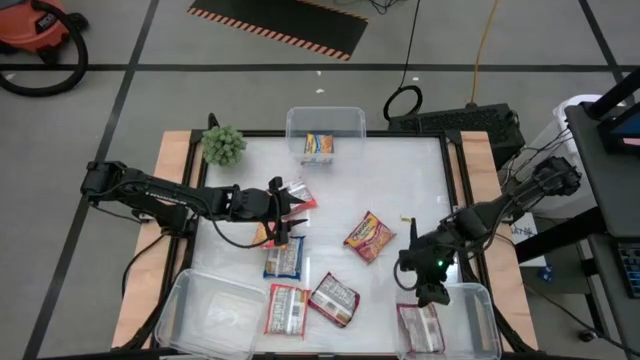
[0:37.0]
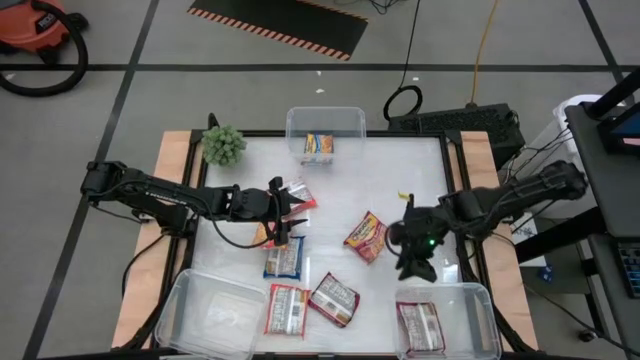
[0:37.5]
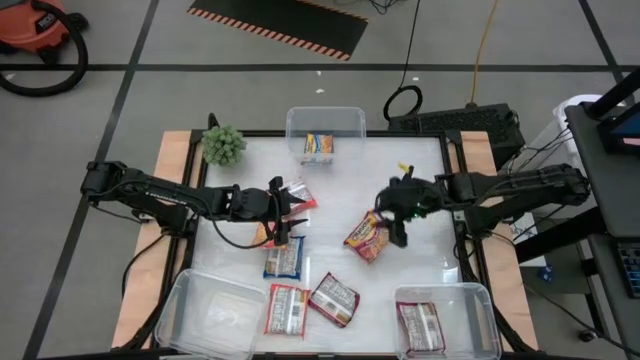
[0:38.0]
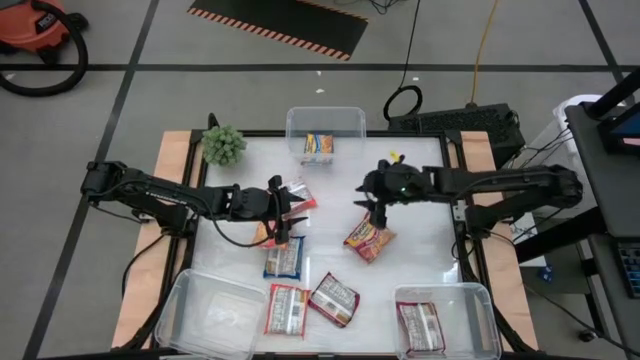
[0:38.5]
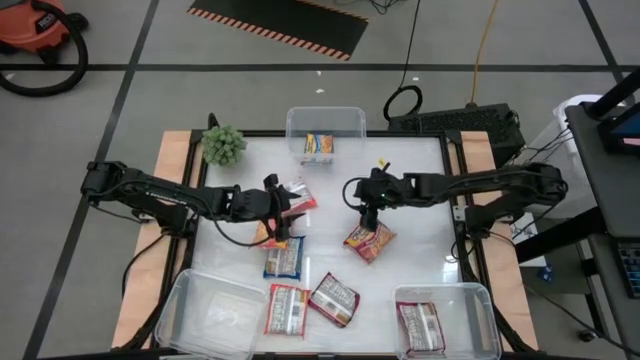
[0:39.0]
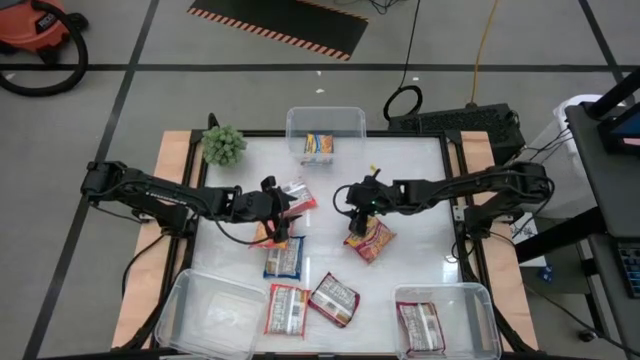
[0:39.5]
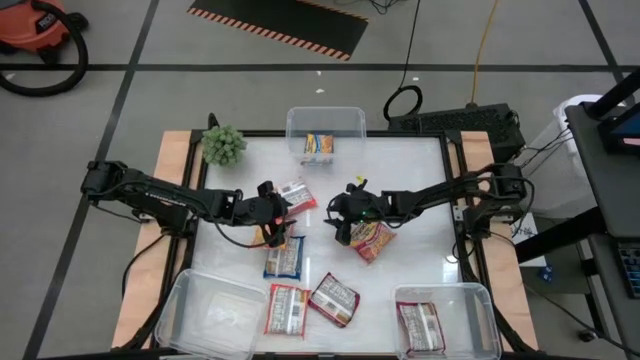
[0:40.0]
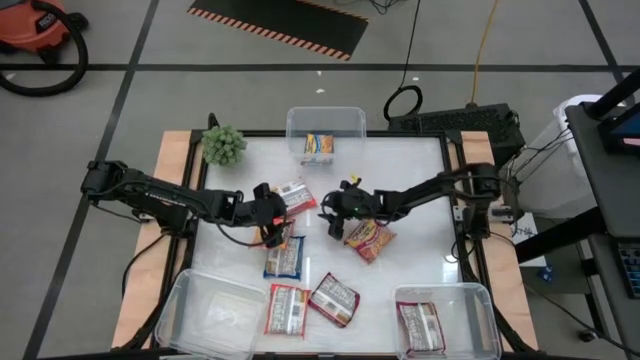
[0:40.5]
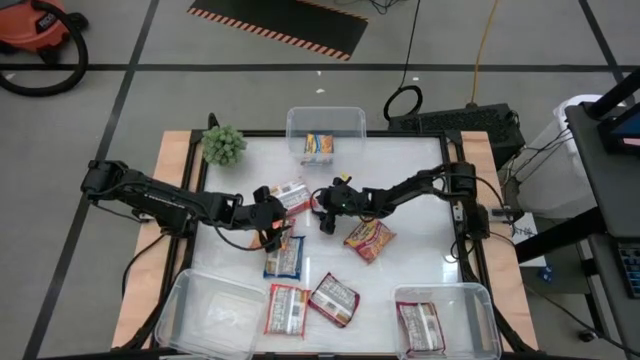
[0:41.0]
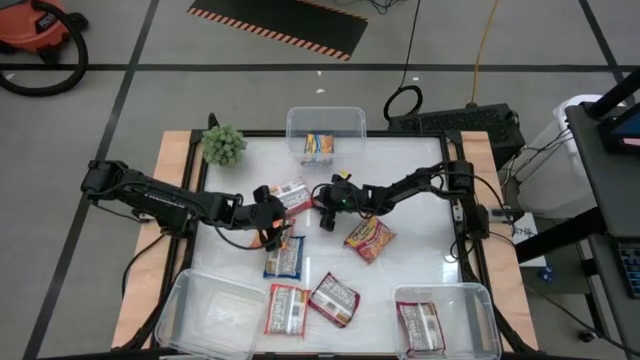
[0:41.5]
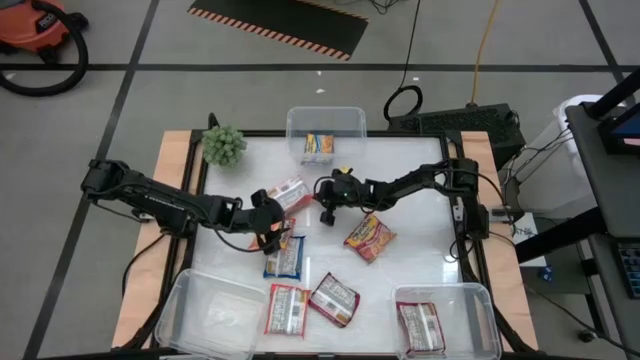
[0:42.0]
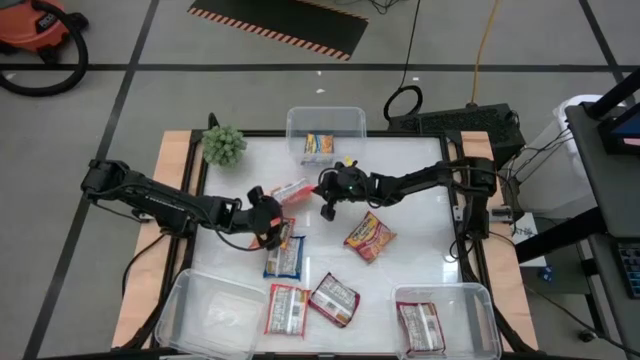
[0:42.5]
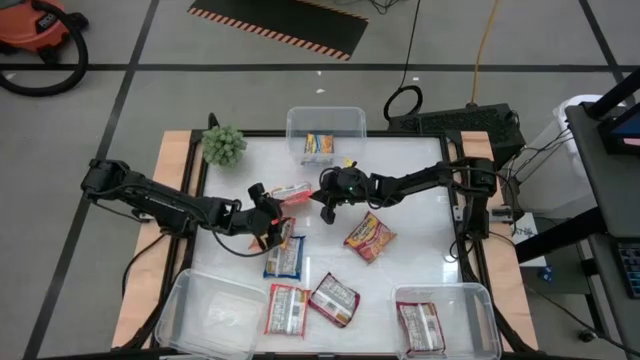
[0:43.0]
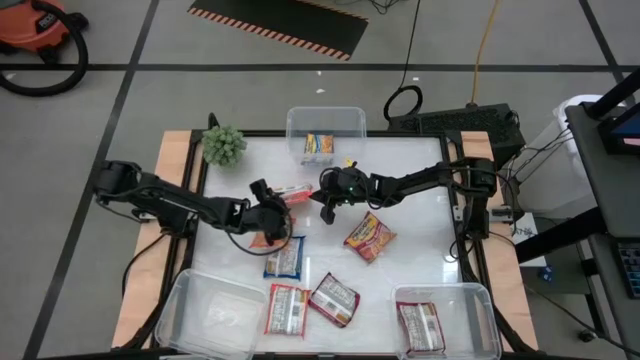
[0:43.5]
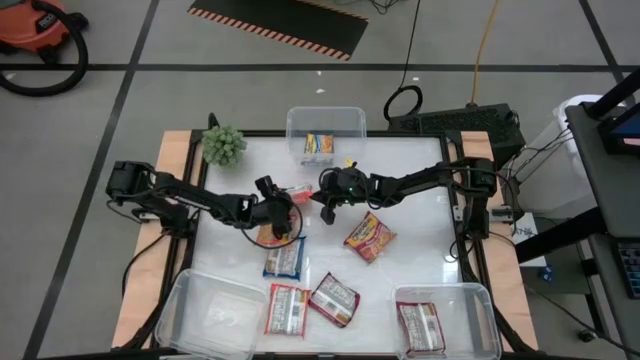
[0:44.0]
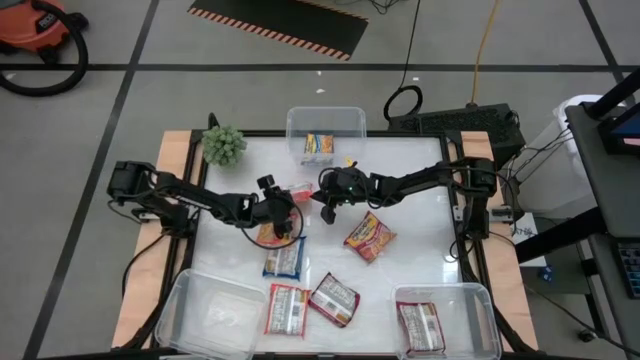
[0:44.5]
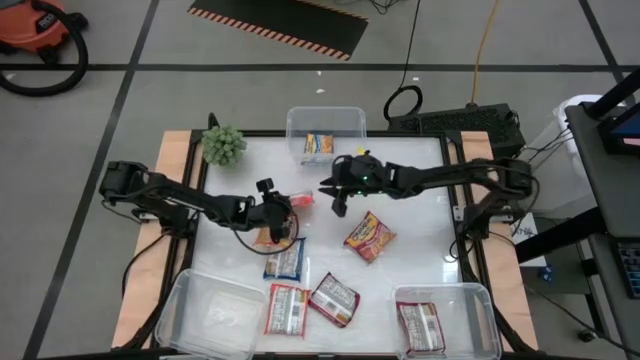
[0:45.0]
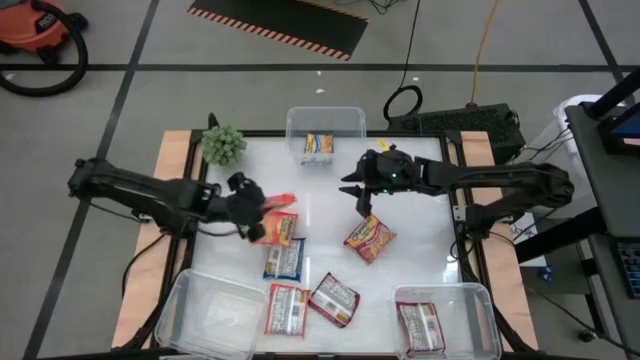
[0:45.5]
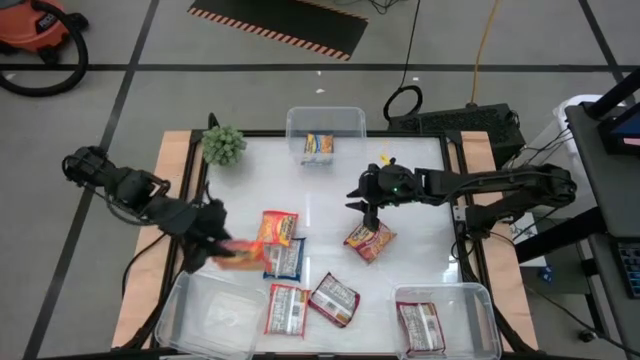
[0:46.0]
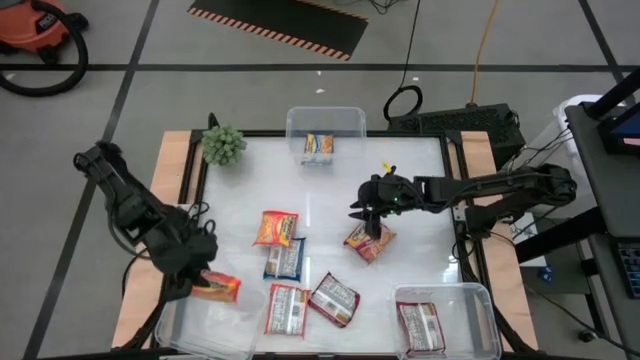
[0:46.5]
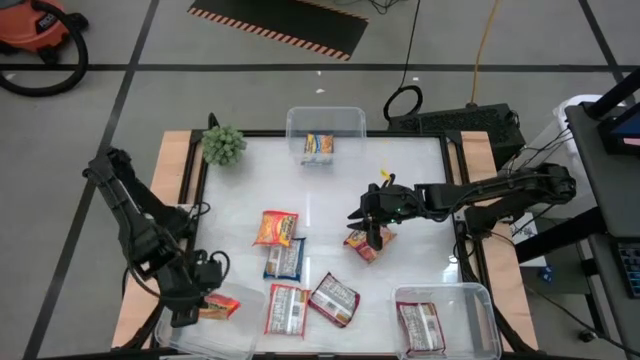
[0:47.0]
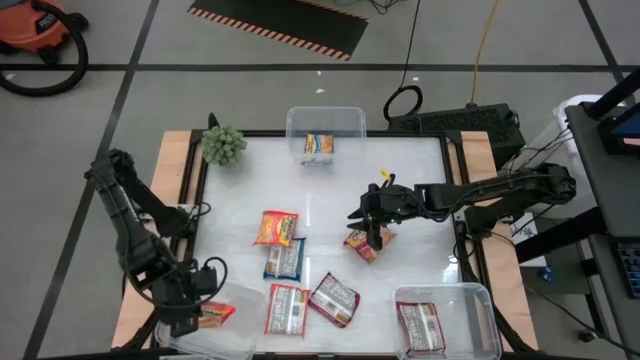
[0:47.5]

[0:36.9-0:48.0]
Task: Sort Maruchan noodles
Put the top orange noodle pack into the left transparent bin

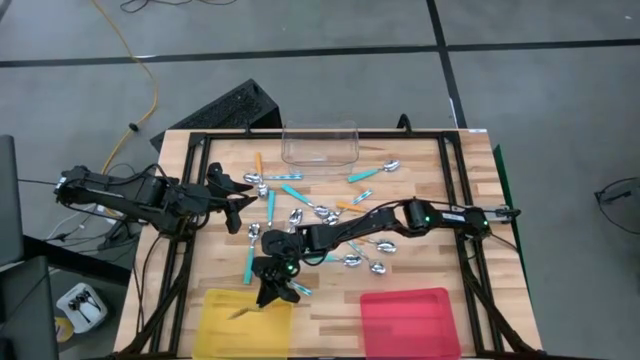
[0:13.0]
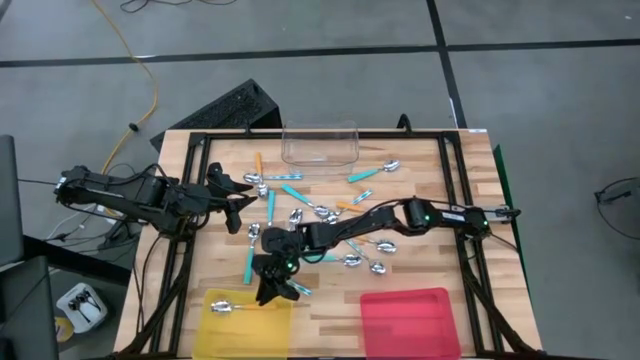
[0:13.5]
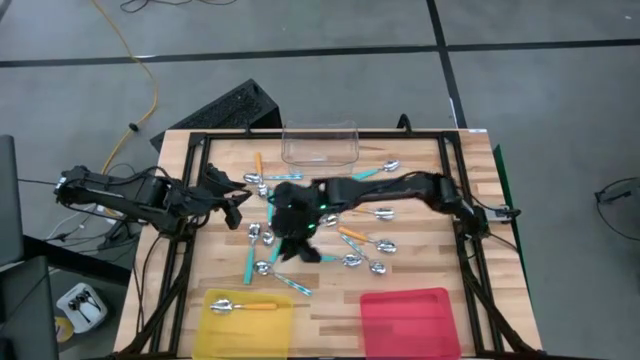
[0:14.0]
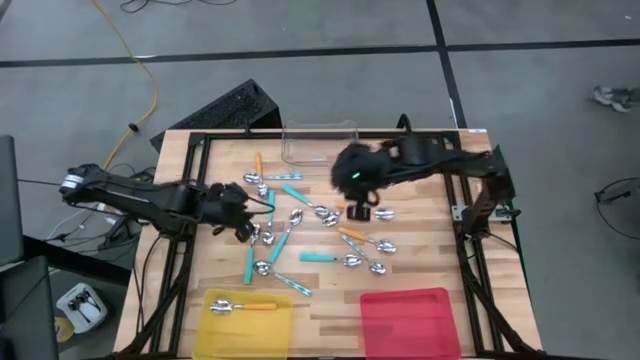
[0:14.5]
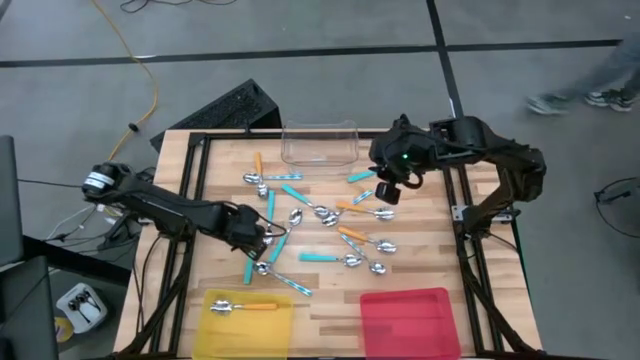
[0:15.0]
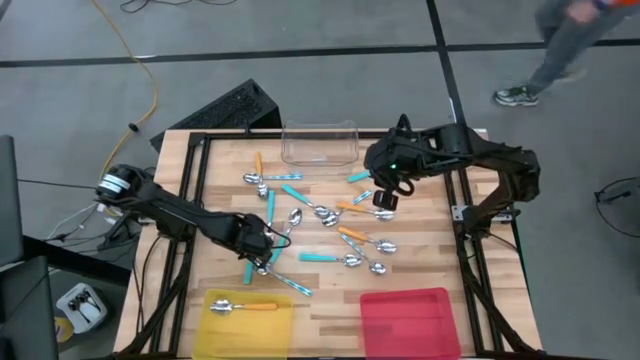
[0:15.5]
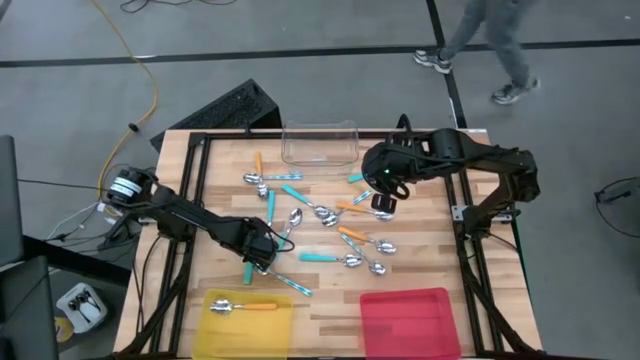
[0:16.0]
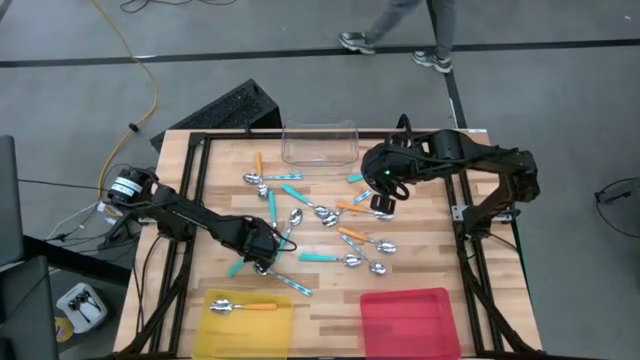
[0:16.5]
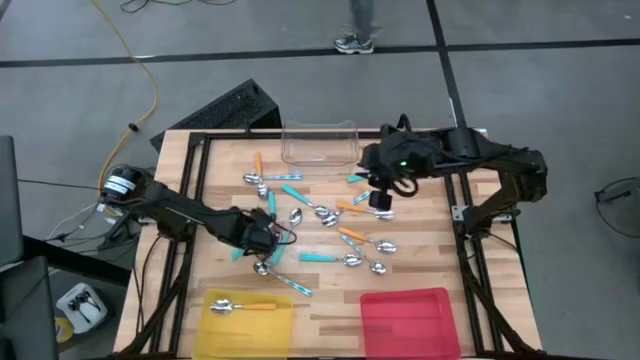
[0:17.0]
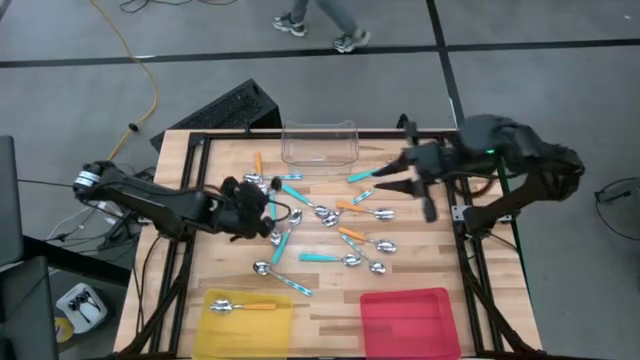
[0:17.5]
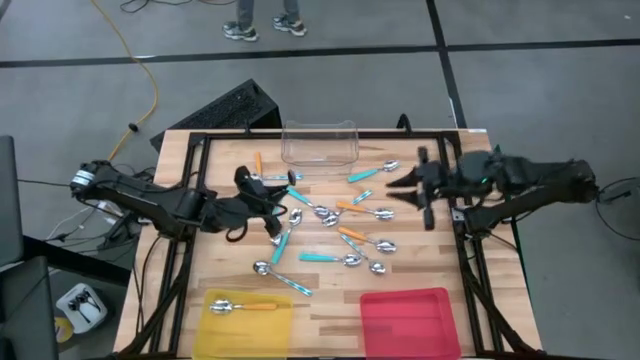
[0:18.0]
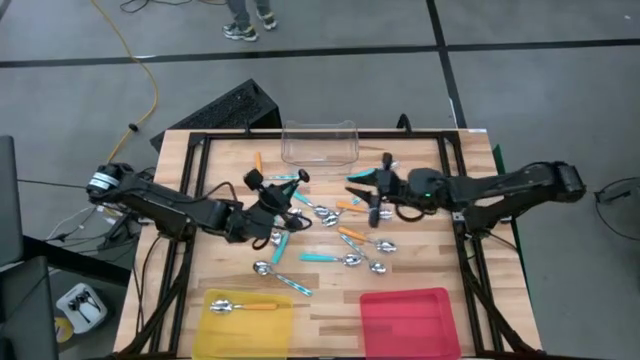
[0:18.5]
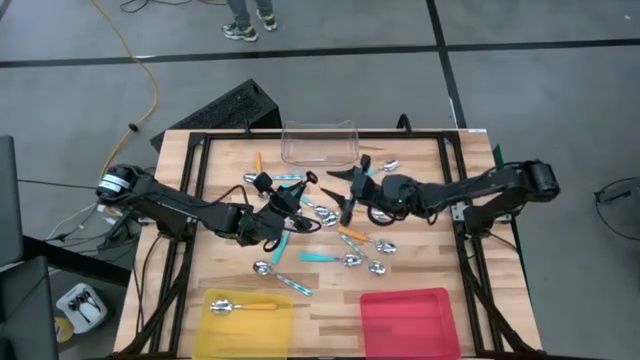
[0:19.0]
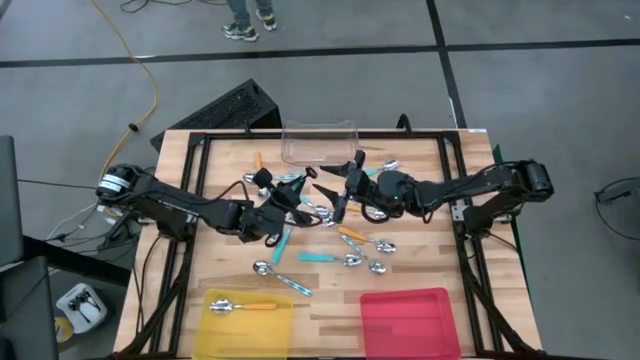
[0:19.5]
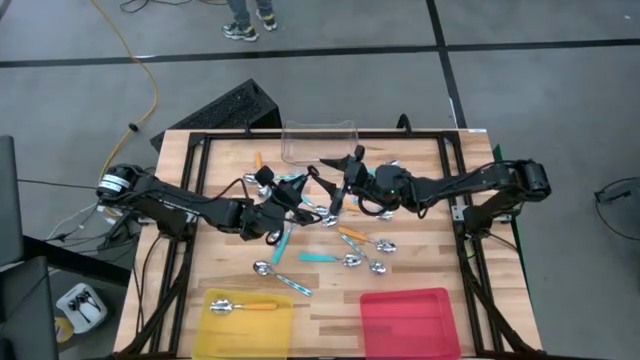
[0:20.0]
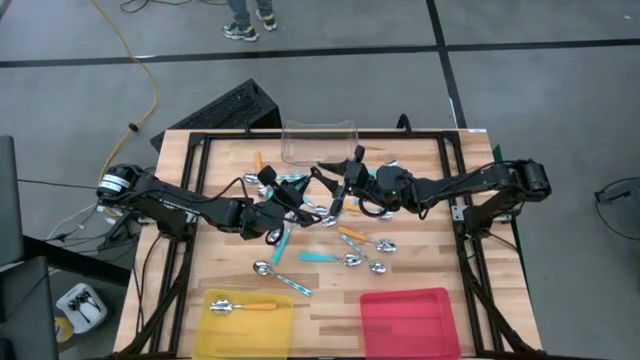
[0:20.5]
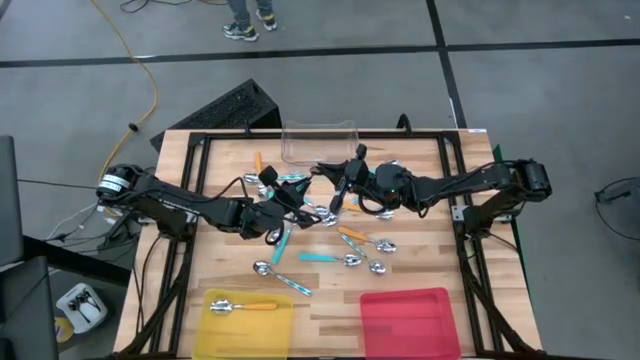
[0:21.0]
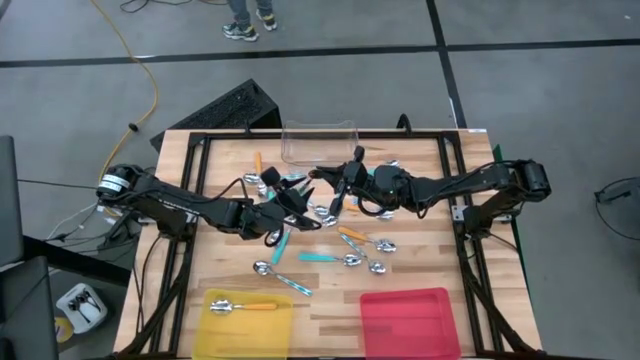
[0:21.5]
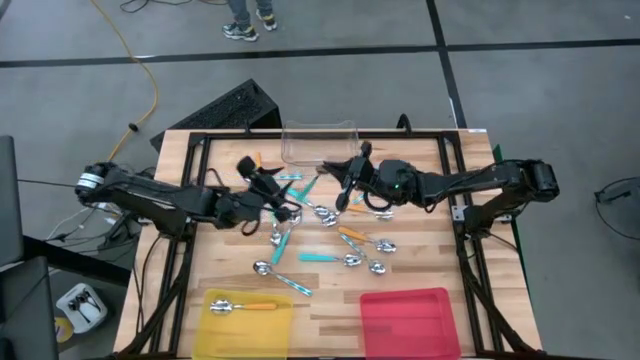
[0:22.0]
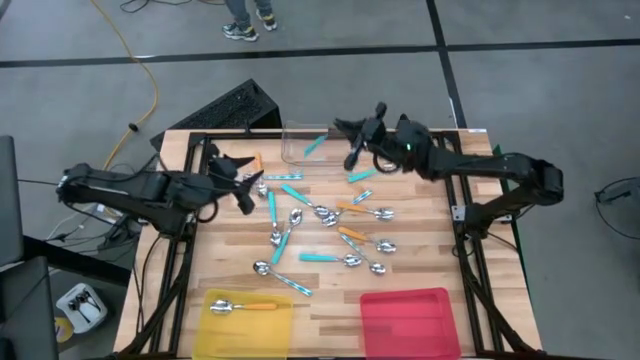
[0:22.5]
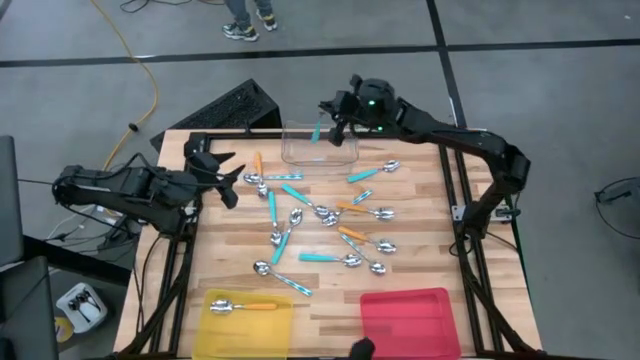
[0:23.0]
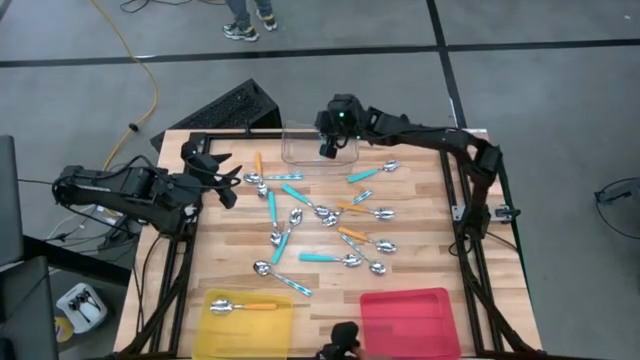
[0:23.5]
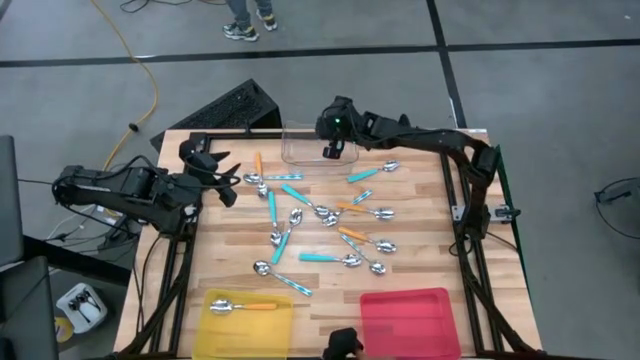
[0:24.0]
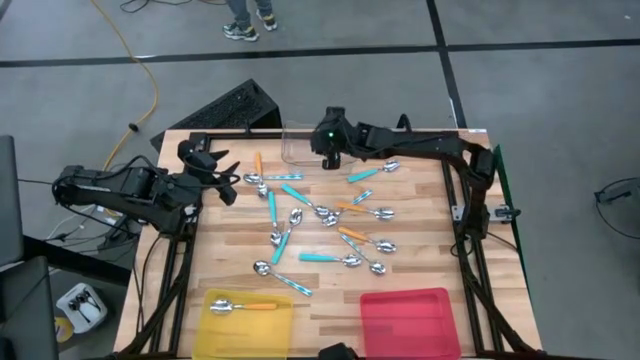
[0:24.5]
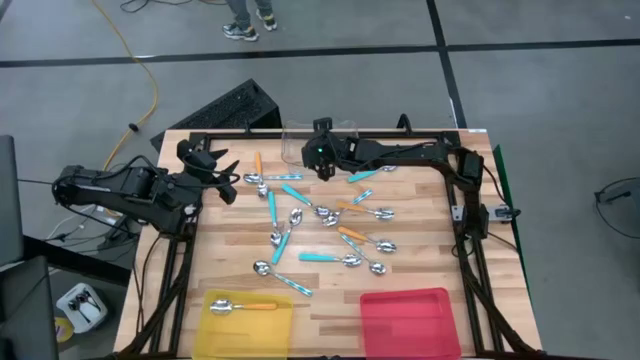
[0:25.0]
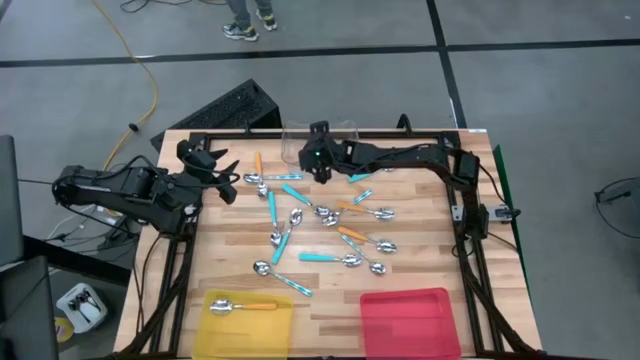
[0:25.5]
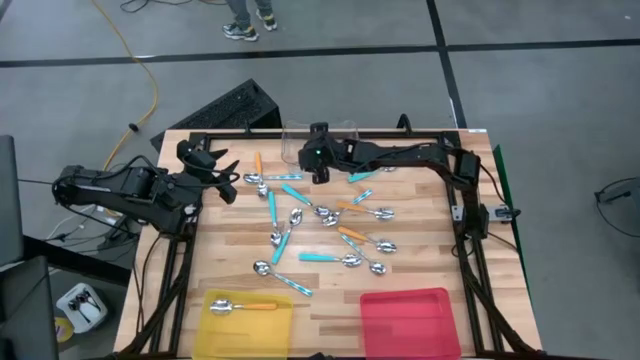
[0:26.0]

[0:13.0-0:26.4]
Task: Sort silverware by color (type)
Put the blue spoon into the transparent bin
